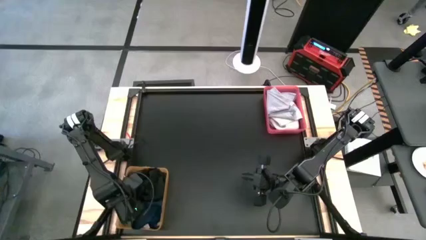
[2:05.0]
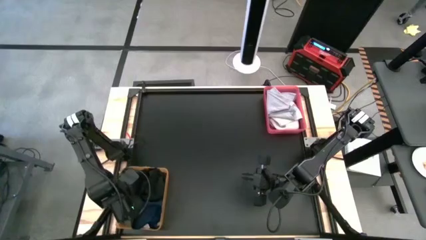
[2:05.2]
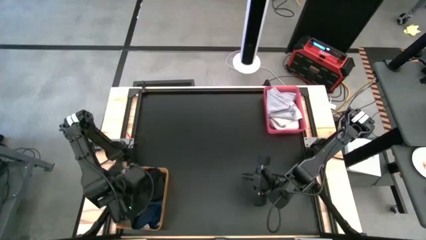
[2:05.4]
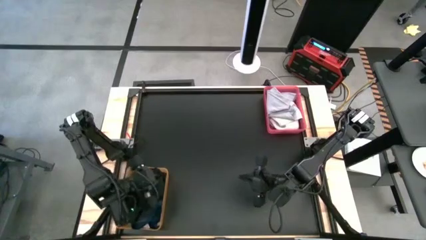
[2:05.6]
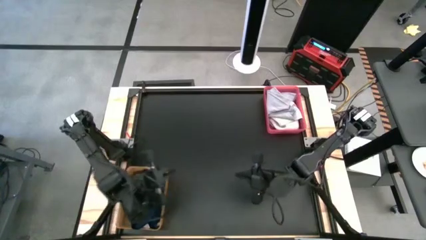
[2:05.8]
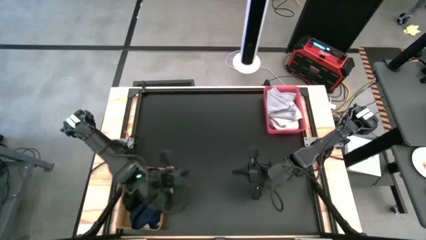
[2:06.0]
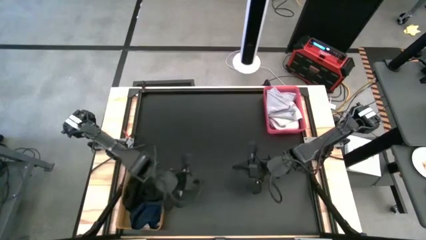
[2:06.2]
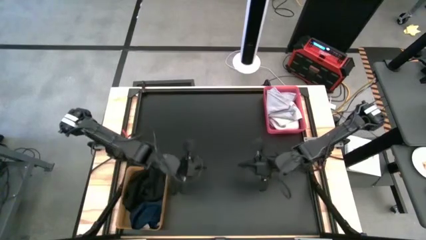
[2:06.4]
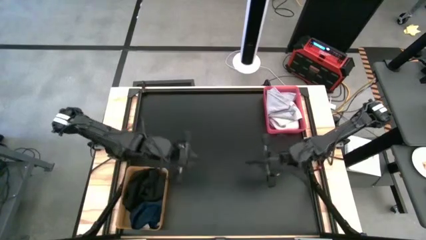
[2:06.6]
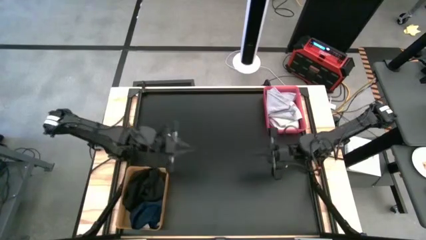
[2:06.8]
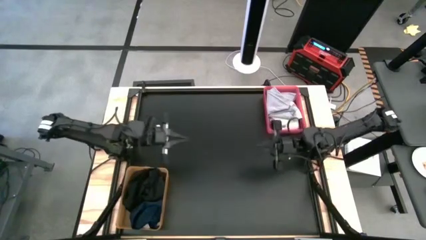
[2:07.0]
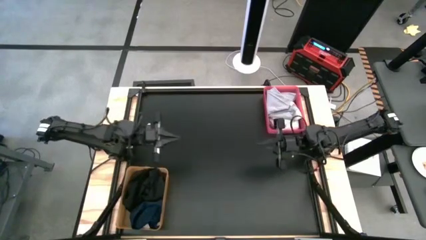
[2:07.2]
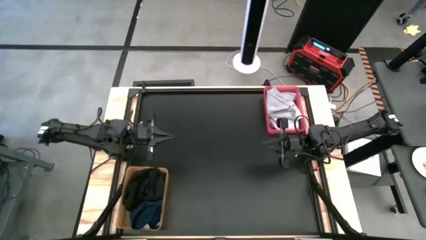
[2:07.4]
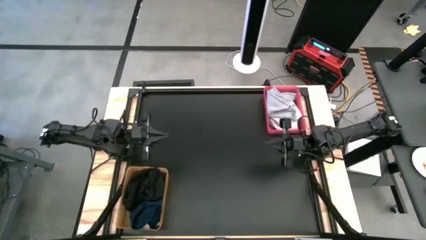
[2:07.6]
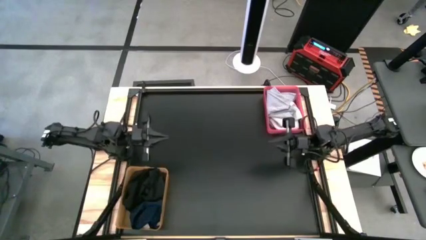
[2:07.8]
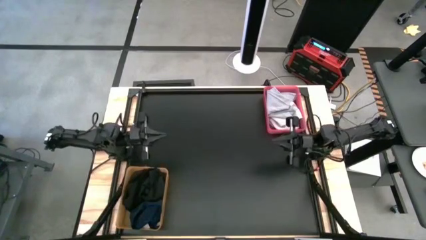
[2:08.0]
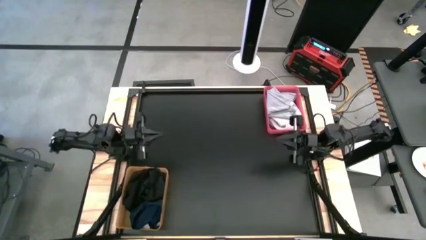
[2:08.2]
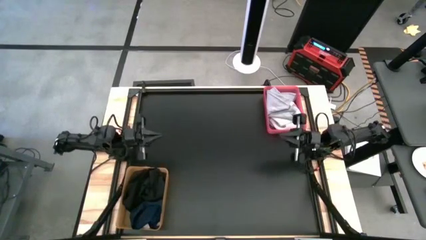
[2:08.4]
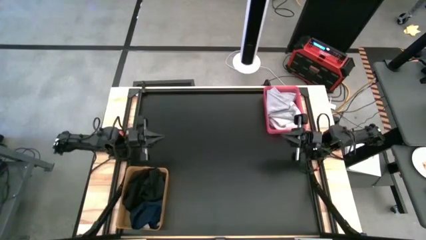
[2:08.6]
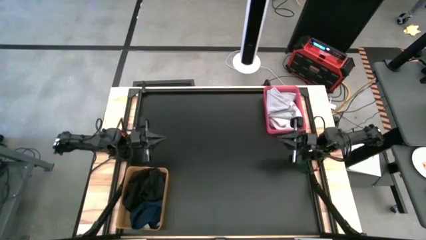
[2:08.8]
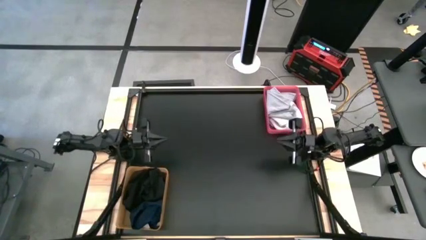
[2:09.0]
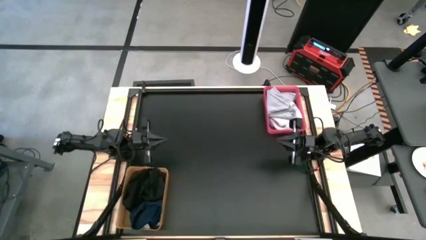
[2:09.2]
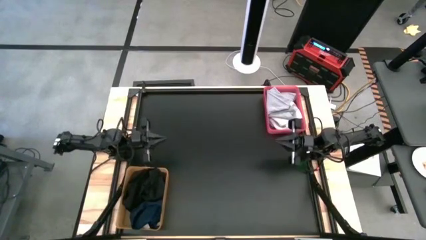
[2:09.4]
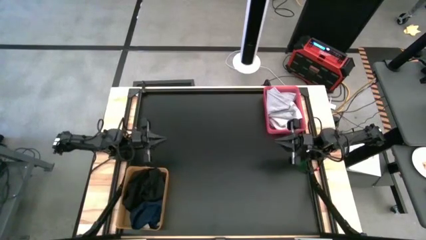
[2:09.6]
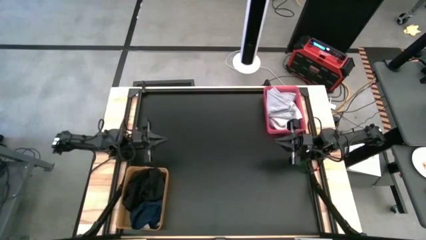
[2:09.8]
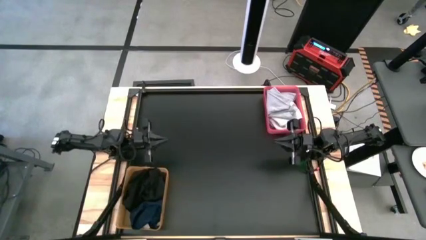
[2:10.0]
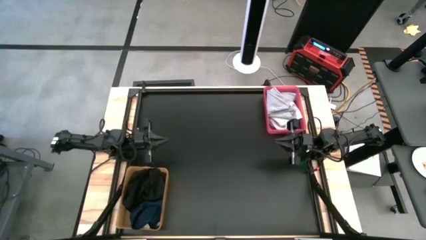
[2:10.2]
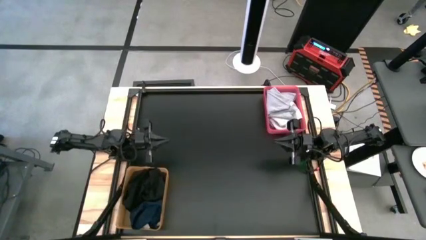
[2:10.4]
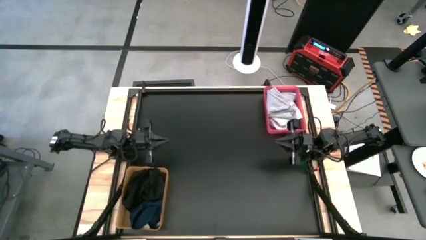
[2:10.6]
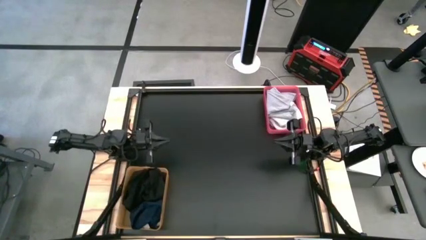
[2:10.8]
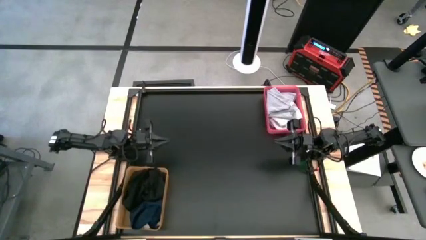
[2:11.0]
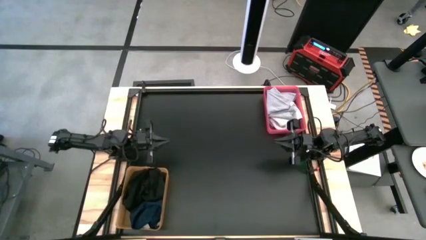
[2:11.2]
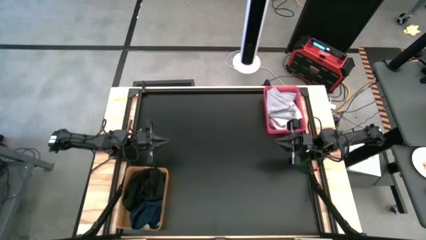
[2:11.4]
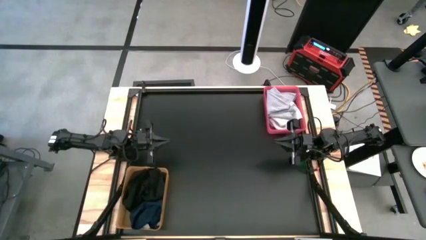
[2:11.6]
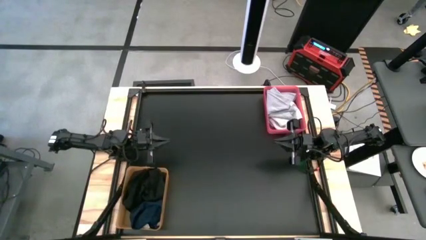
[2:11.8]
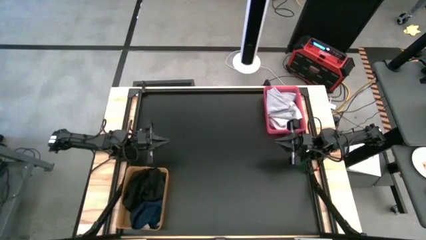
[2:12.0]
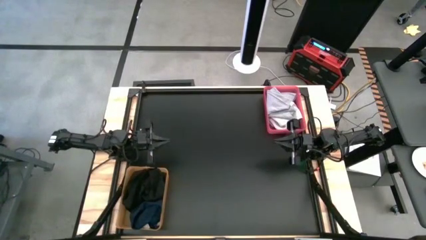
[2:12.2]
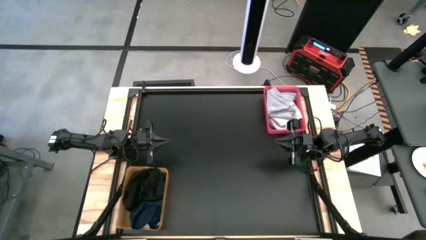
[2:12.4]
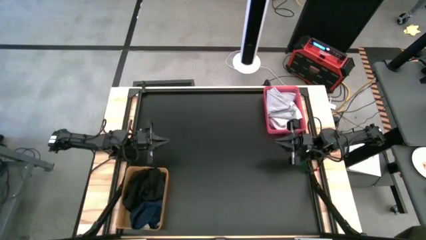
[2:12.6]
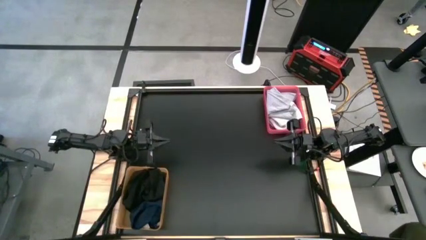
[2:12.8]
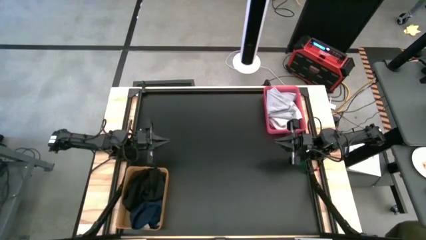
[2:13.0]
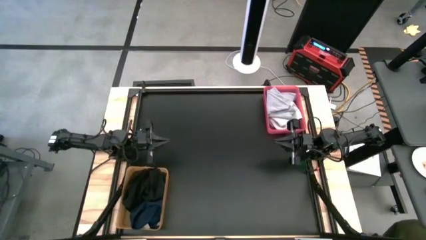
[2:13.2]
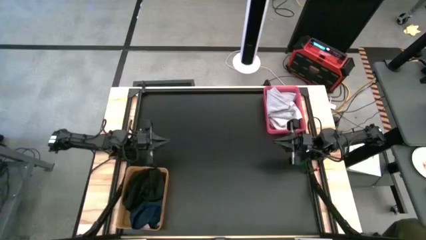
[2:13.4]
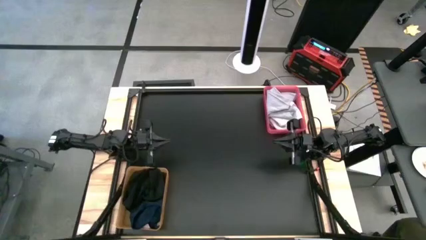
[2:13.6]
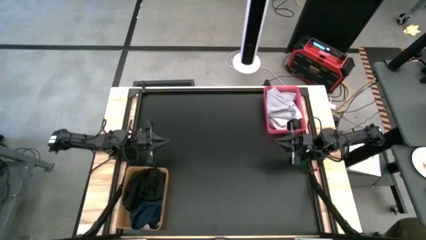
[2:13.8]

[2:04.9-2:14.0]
Task: Sort towels by color in basket
Return to Home Position

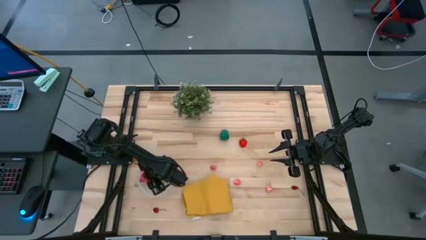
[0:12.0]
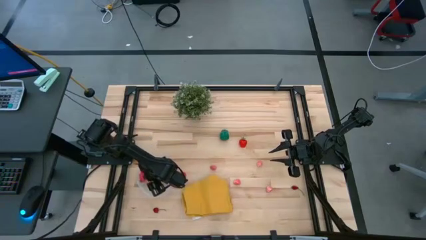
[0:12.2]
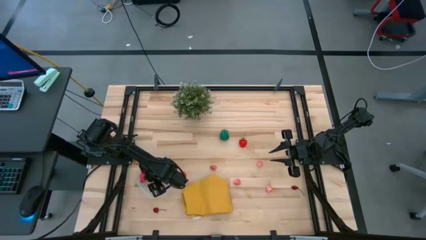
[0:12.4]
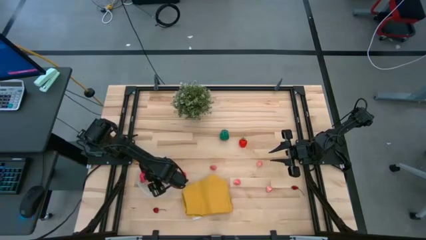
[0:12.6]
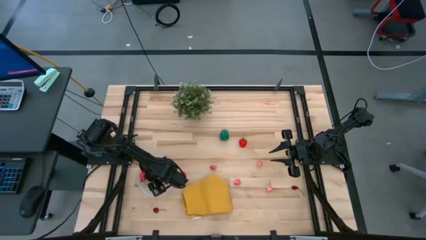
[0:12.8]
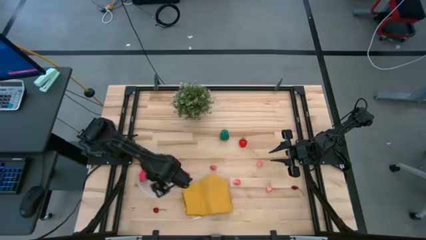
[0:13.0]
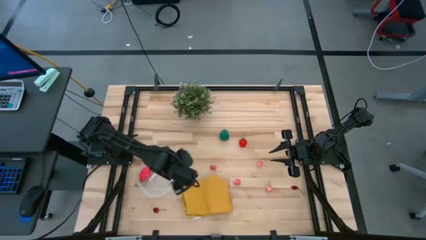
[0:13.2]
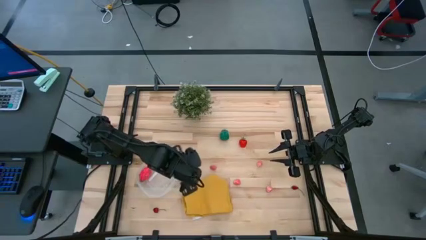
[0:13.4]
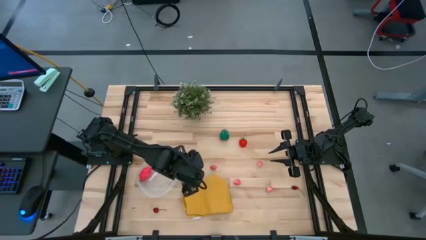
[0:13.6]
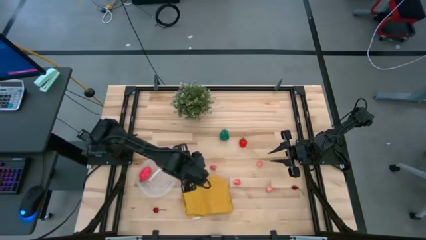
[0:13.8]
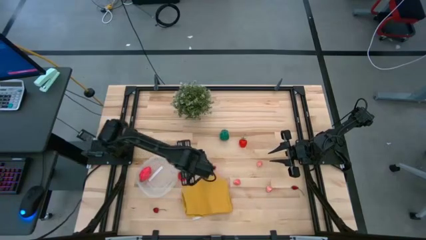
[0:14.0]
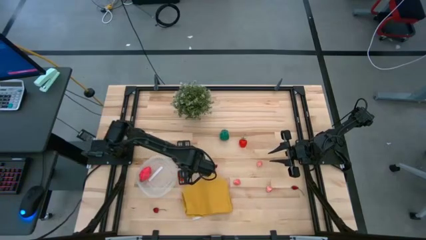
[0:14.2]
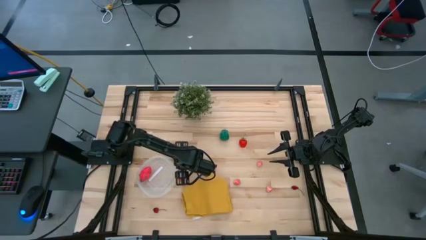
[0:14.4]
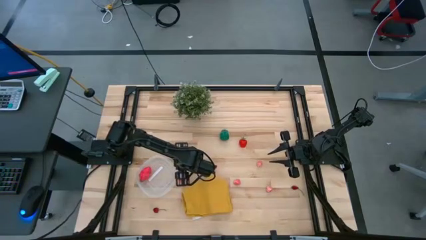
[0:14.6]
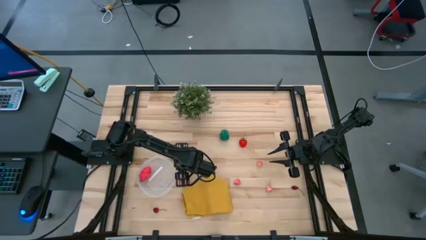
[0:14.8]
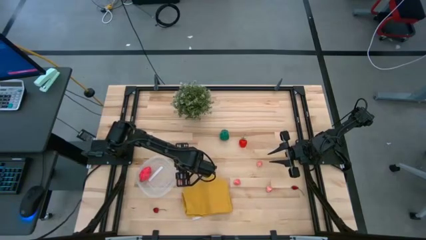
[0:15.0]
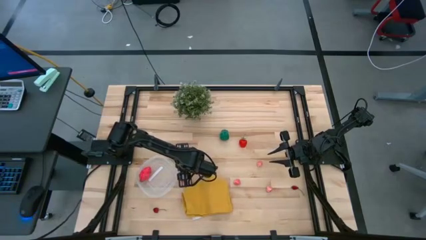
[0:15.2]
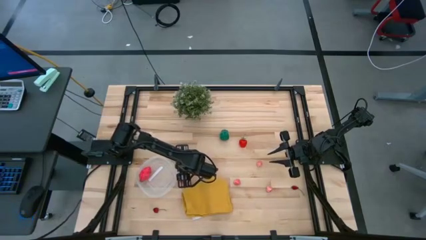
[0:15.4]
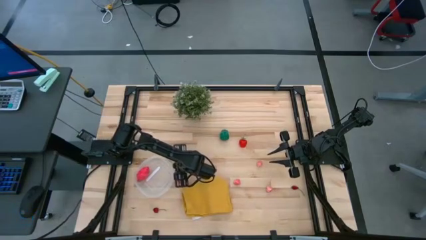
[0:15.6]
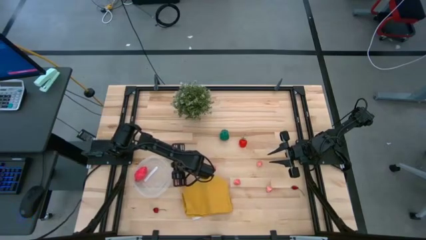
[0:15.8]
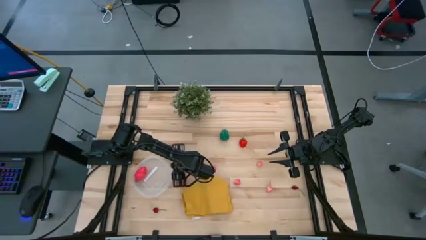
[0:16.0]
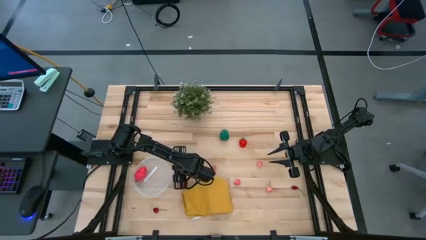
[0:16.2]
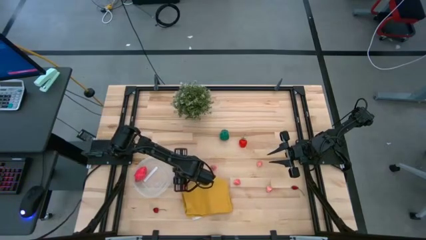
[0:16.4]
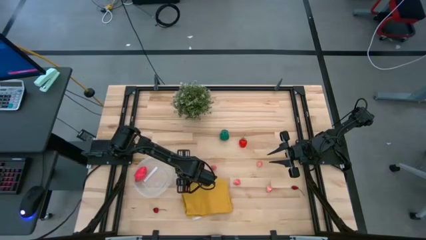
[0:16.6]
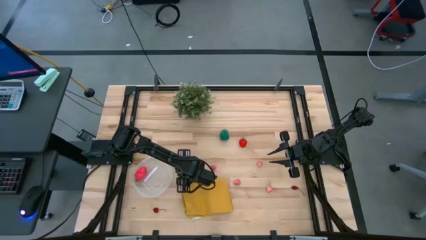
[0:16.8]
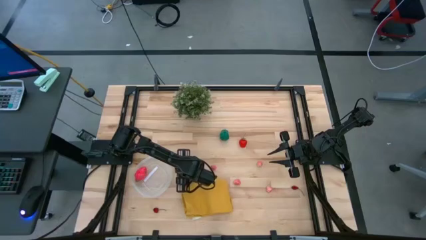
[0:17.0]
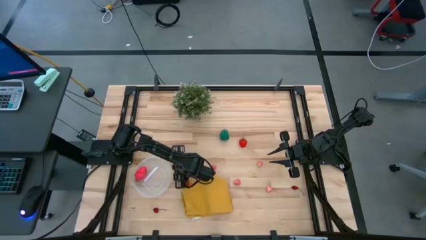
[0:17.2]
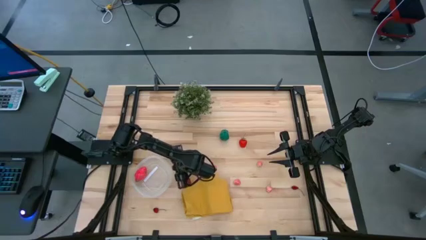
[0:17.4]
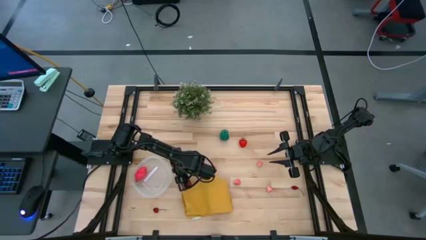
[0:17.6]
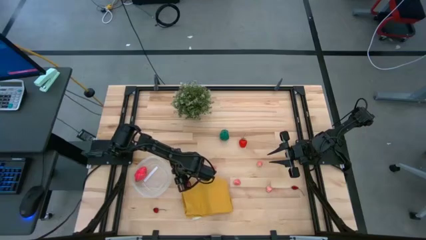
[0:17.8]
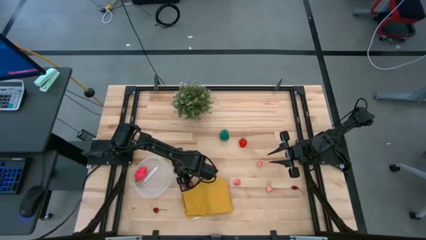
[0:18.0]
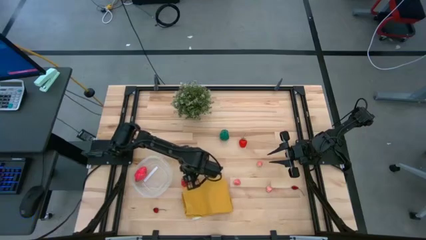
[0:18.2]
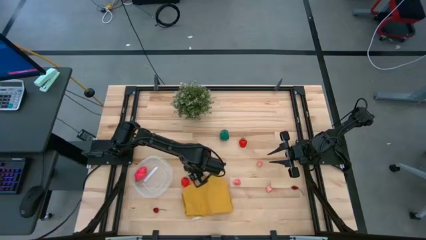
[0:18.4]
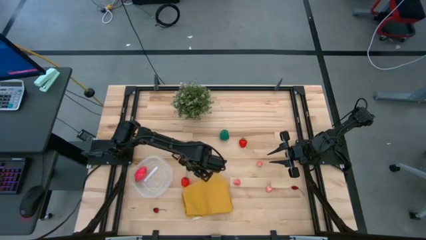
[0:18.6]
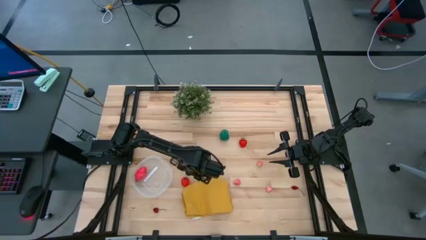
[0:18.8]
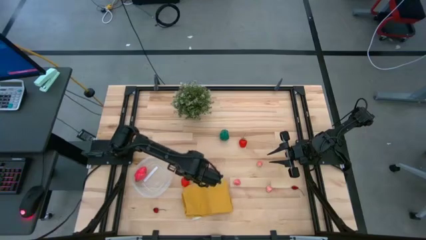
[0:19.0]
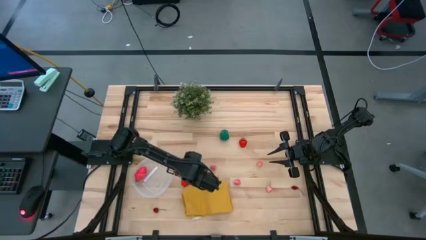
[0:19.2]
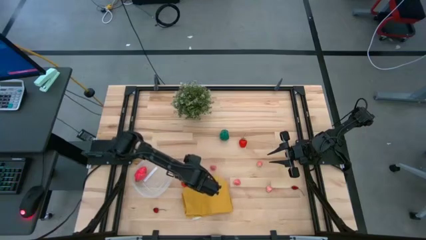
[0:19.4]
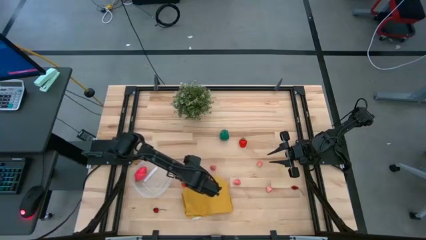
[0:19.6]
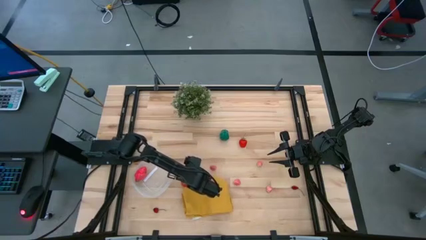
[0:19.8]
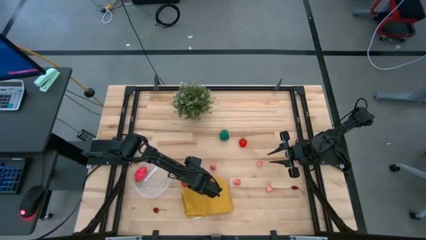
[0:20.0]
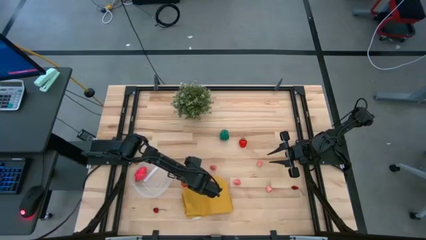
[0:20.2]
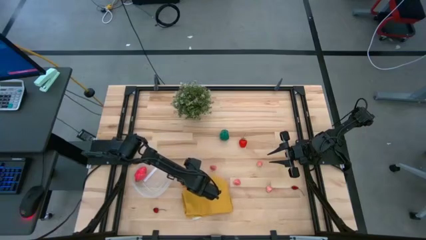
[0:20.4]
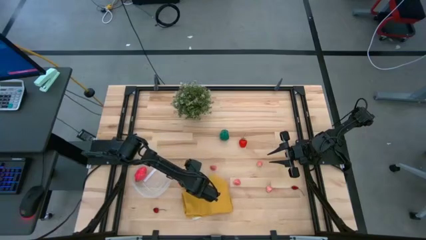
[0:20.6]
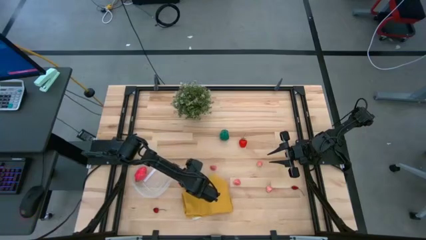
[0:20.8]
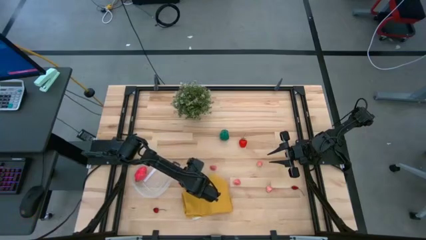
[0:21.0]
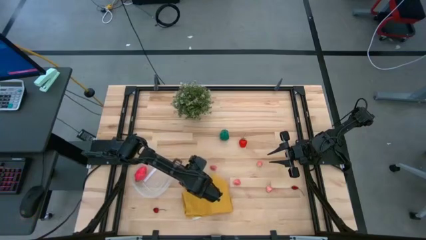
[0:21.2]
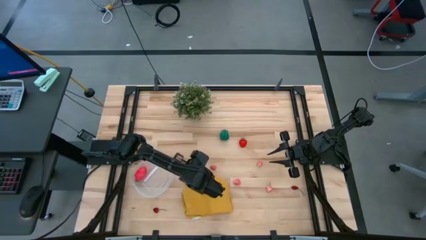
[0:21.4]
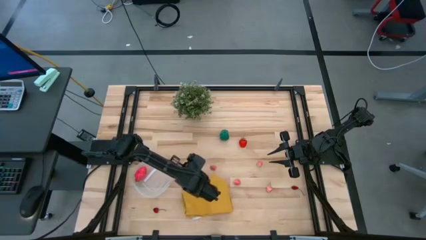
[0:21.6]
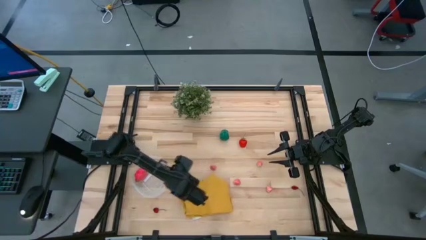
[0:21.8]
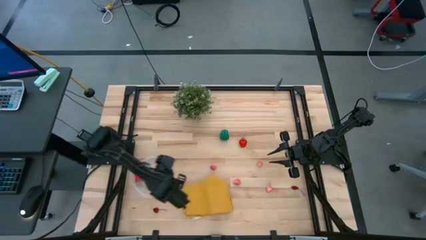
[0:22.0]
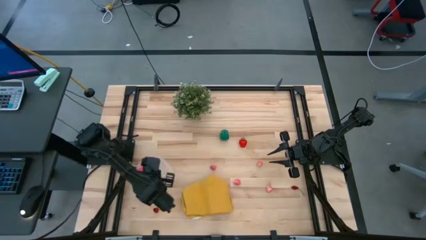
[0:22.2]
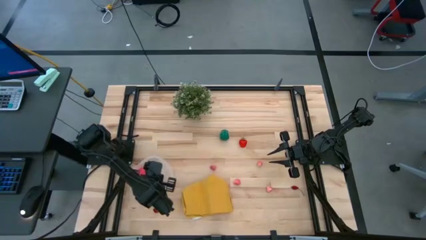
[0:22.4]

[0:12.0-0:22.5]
Task: Pick and placing Produce into tupperware
Put the strawberry into the transparent bin
